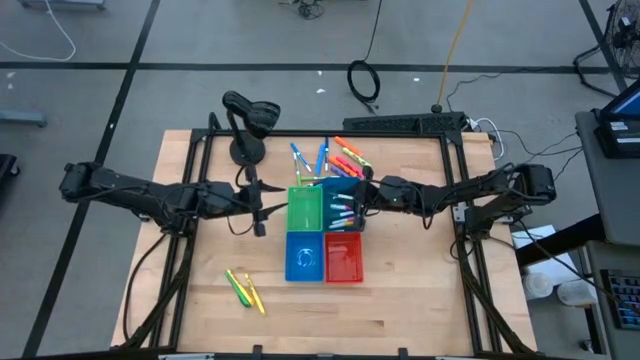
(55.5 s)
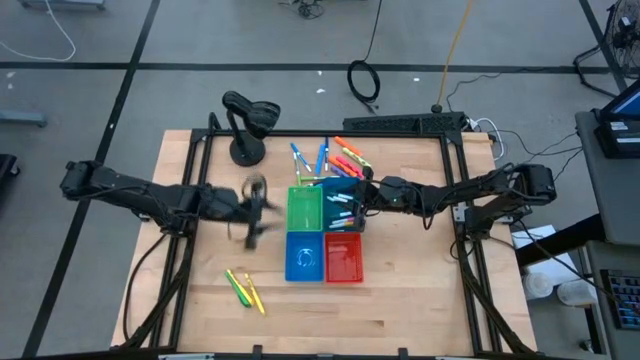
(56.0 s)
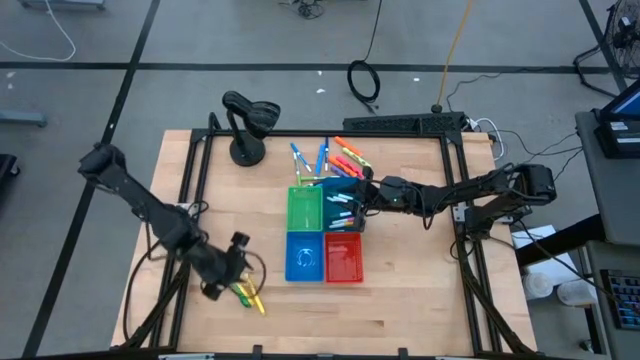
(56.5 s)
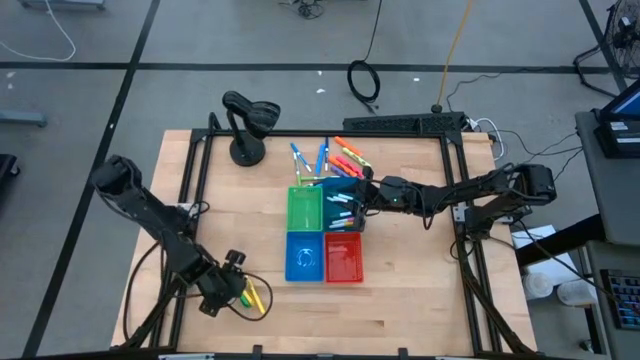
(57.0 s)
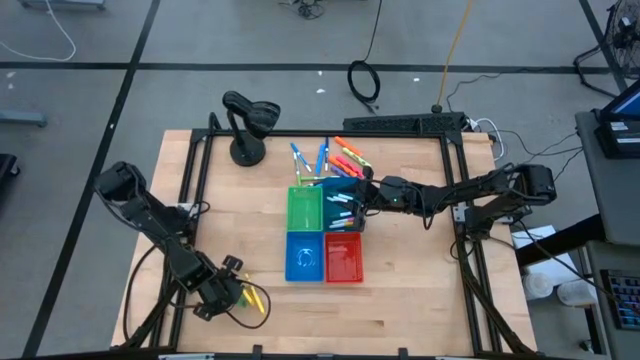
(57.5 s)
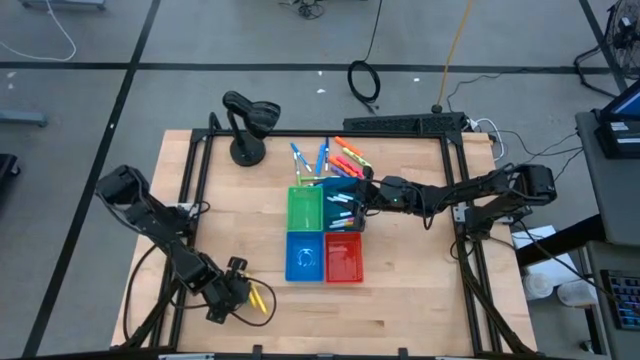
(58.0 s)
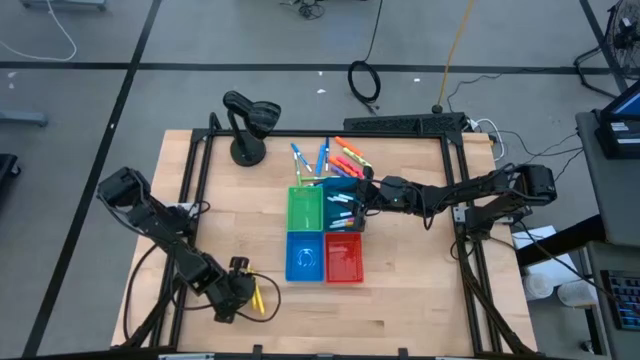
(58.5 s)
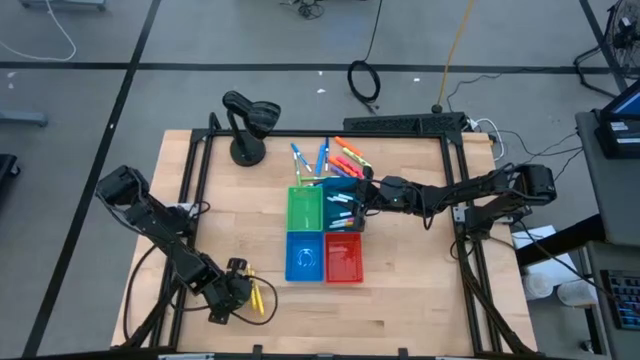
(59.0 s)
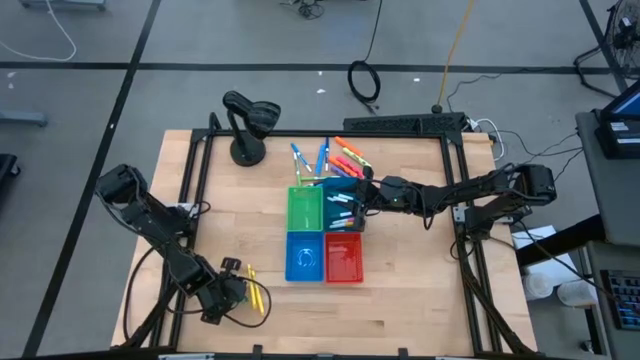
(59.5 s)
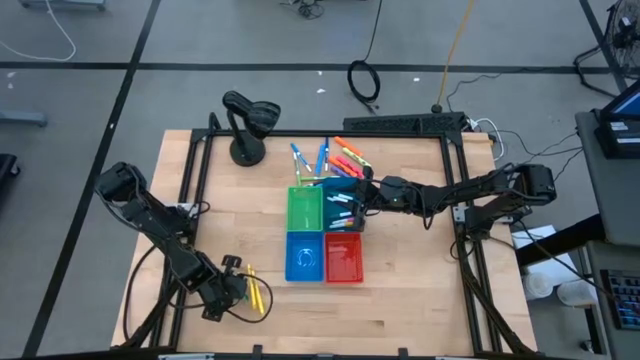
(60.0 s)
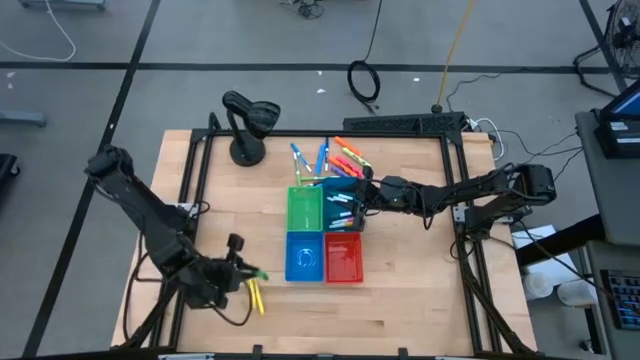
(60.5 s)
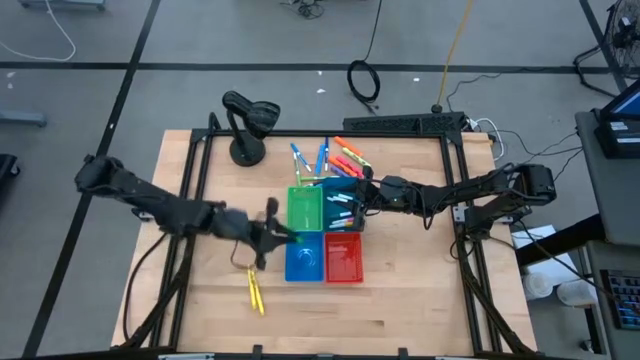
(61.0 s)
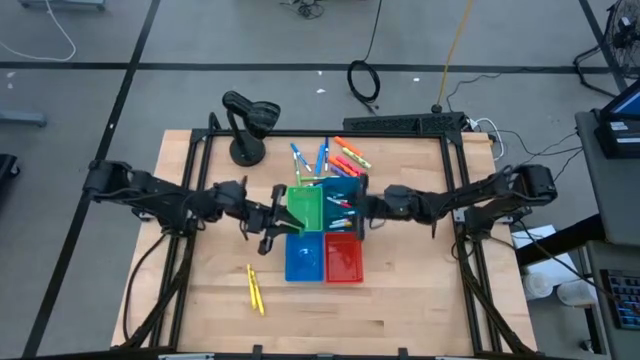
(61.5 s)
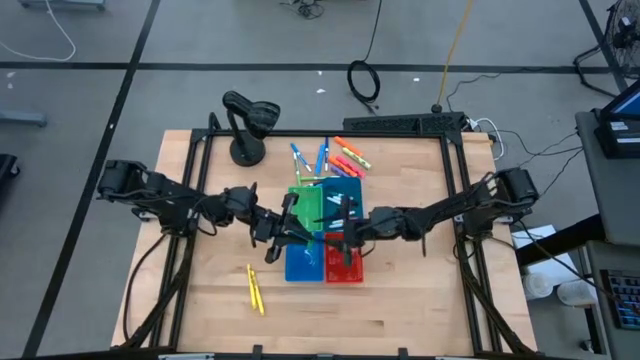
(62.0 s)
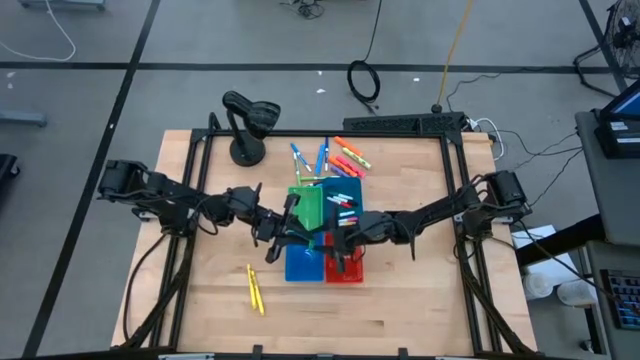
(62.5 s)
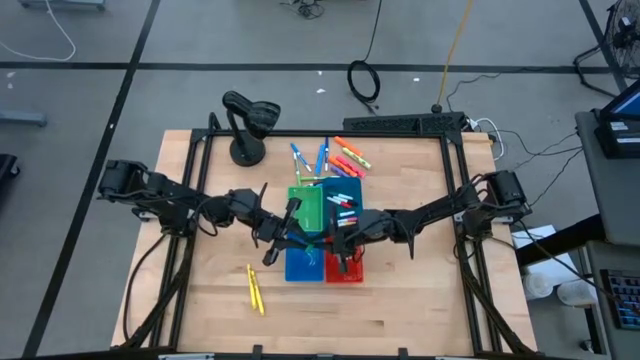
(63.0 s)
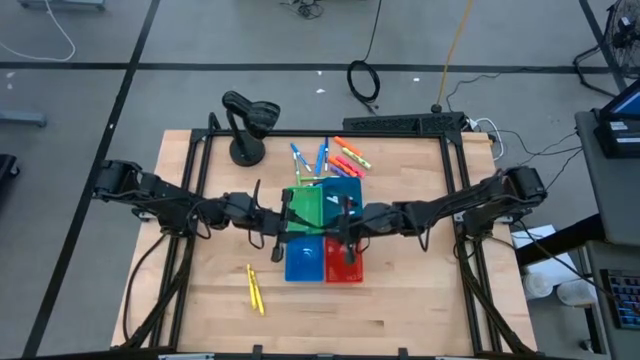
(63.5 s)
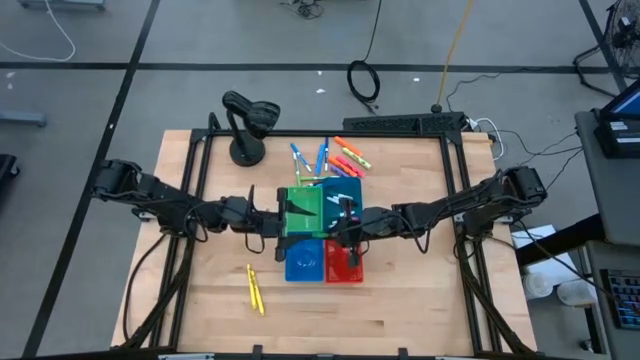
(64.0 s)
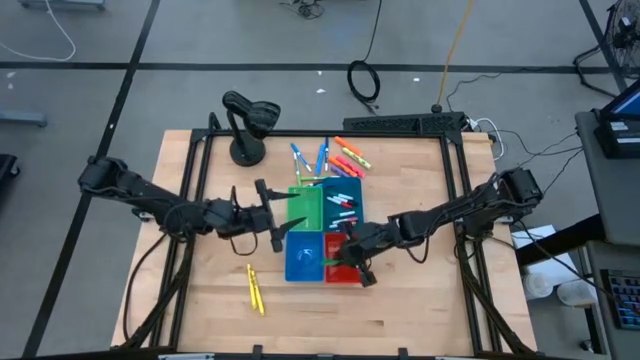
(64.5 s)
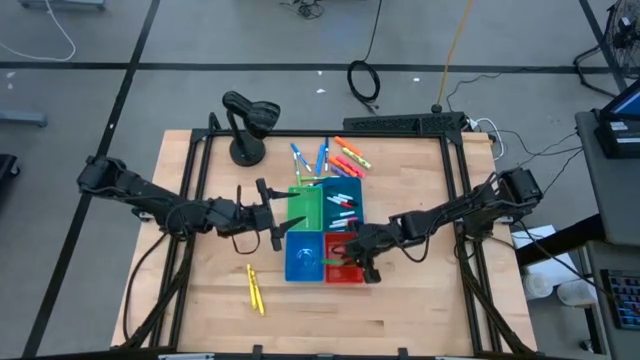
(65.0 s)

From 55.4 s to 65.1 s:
Task: Pick & Place Markers
Put the green pen into the red bin

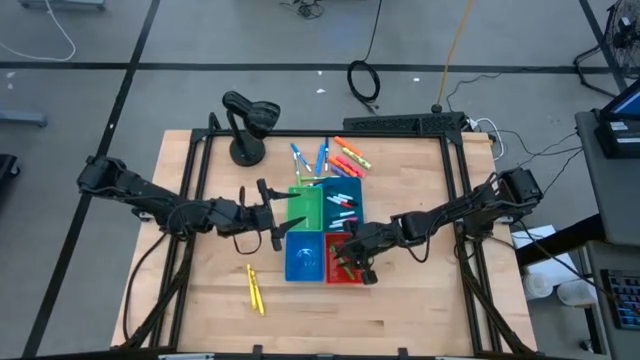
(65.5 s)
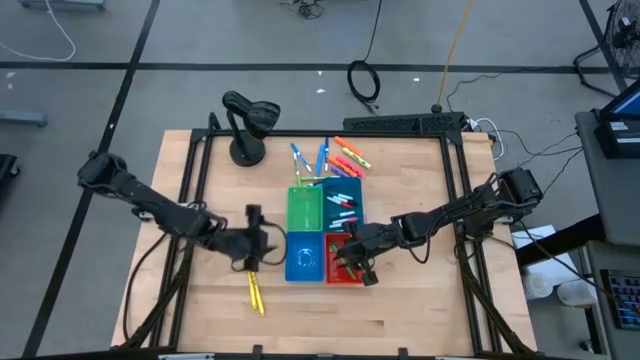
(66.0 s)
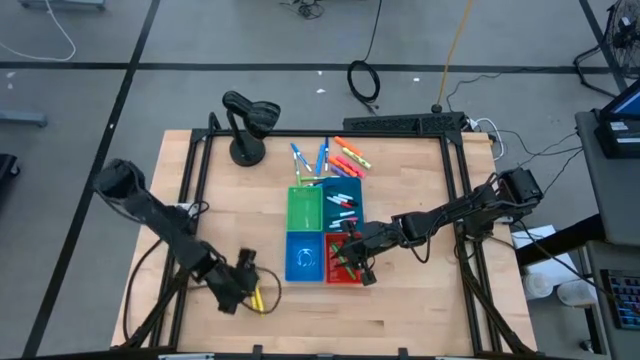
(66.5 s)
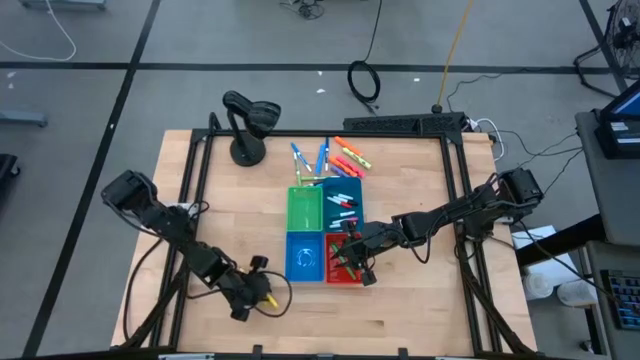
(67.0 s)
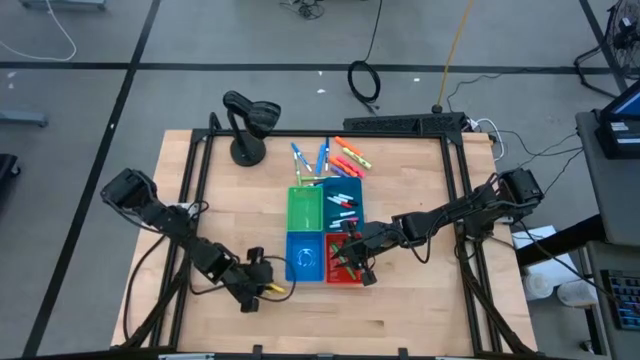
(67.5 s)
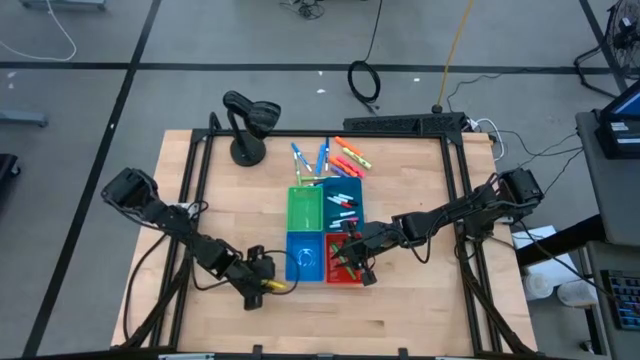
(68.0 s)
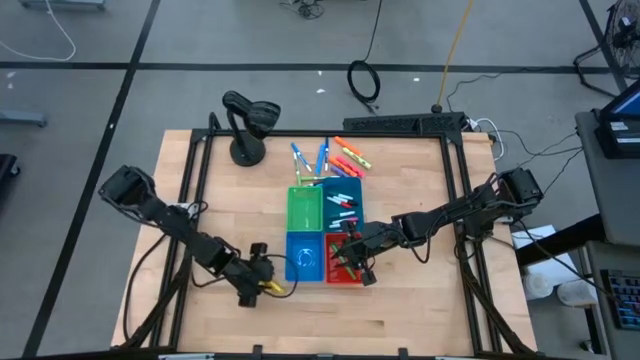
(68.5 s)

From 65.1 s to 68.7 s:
Put the yellow pen into the red bin

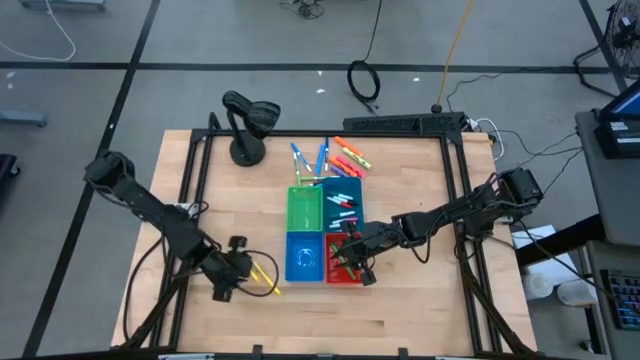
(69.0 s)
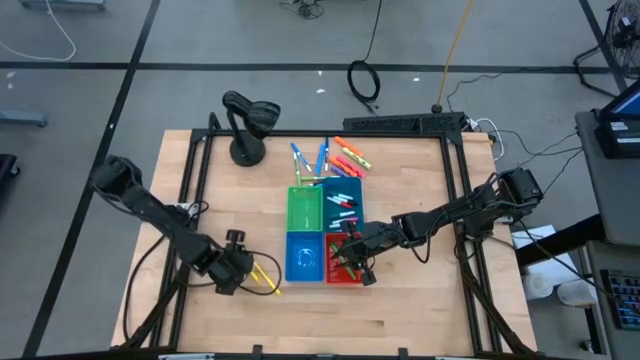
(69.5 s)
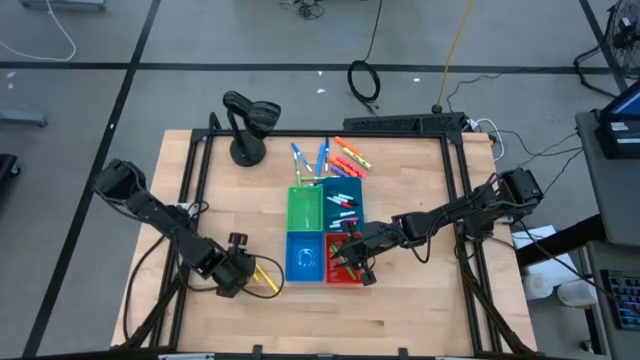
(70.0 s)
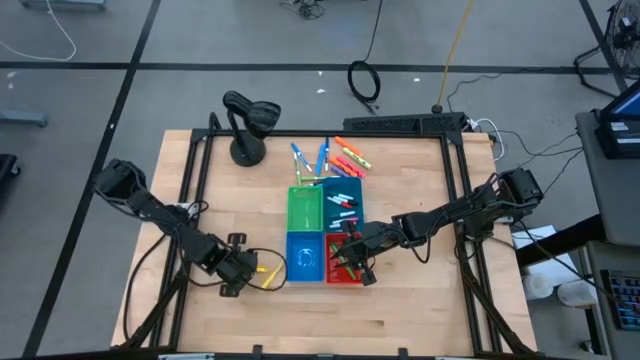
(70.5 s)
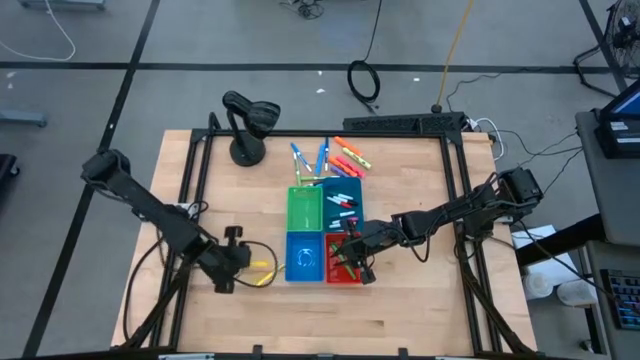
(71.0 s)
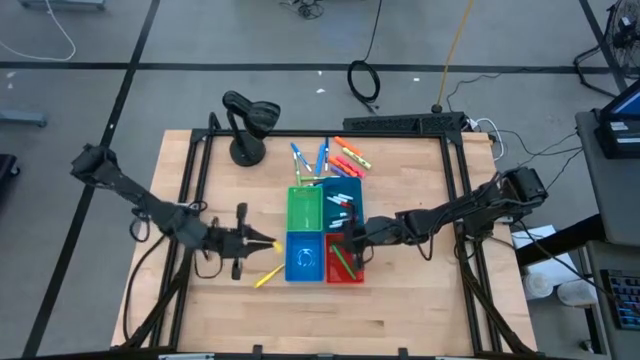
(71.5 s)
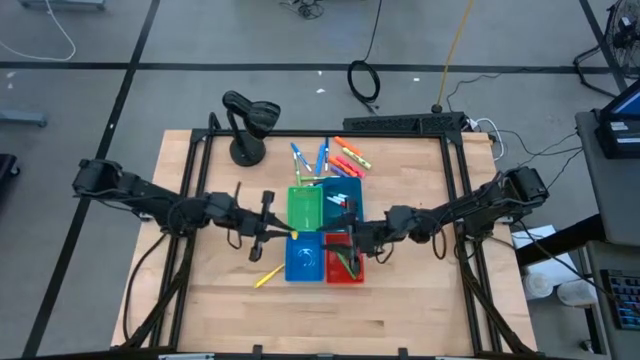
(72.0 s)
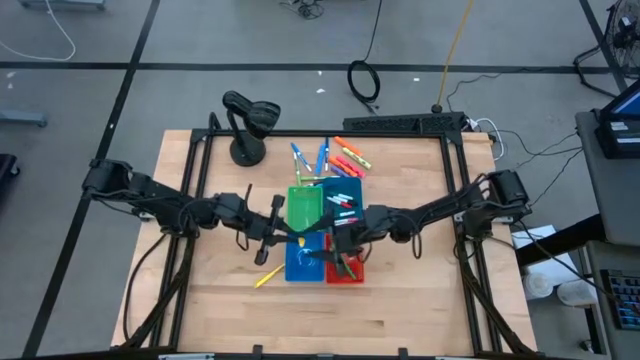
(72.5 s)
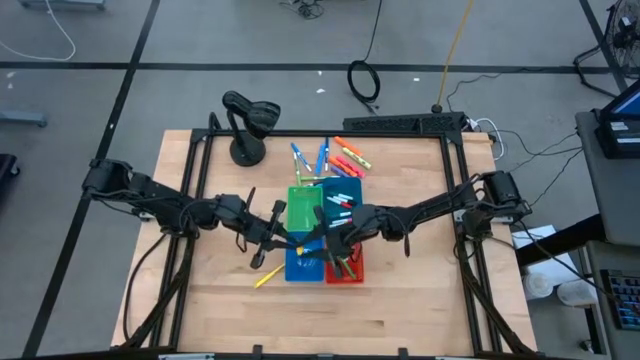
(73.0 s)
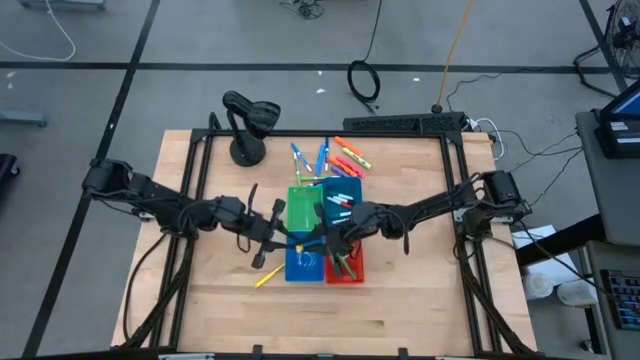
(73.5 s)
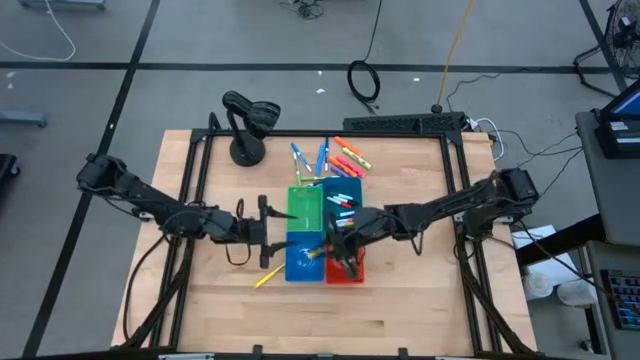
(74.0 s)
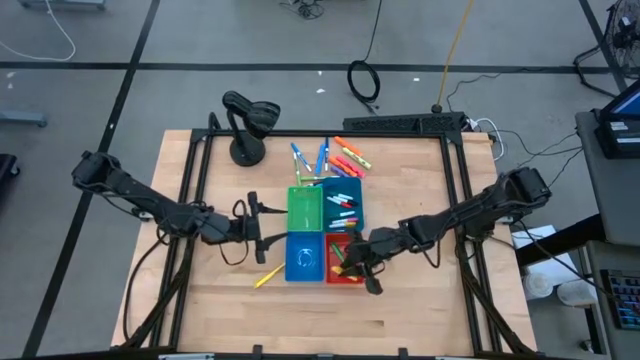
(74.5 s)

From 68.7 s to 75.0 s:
Put the yellow pen into the red bin

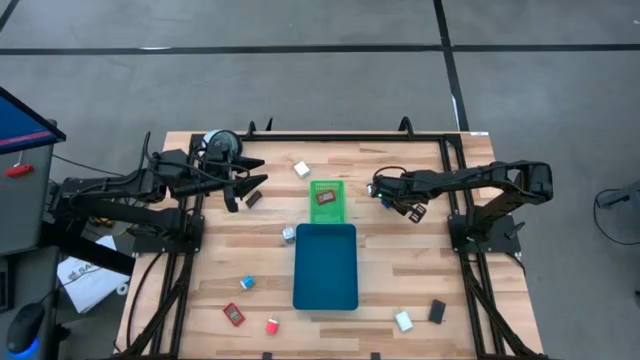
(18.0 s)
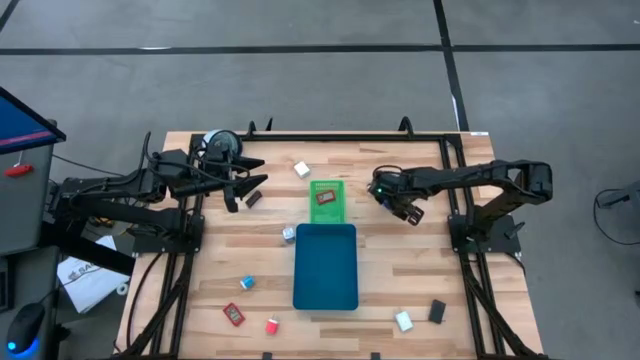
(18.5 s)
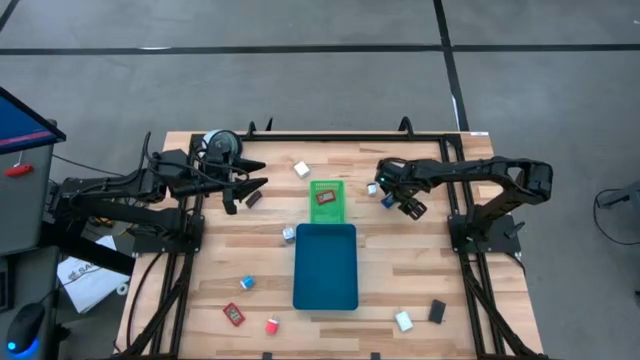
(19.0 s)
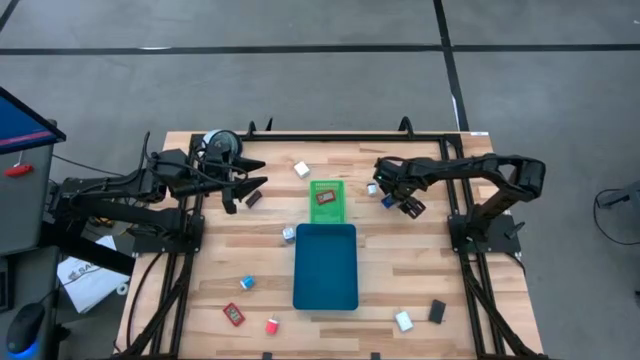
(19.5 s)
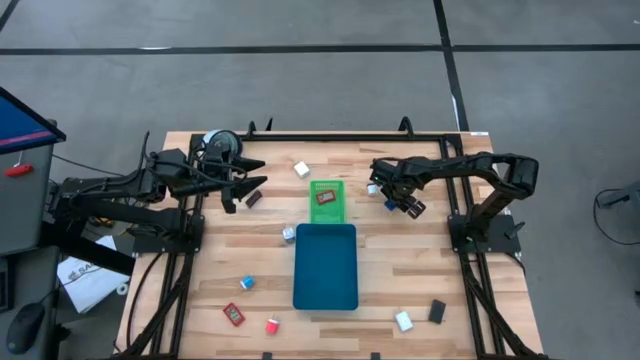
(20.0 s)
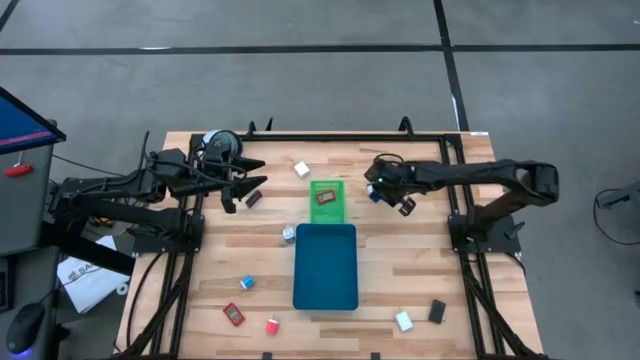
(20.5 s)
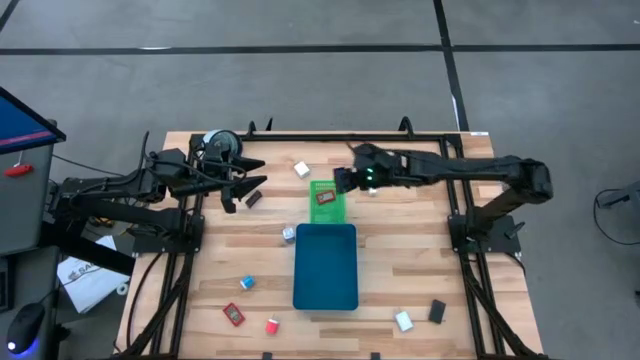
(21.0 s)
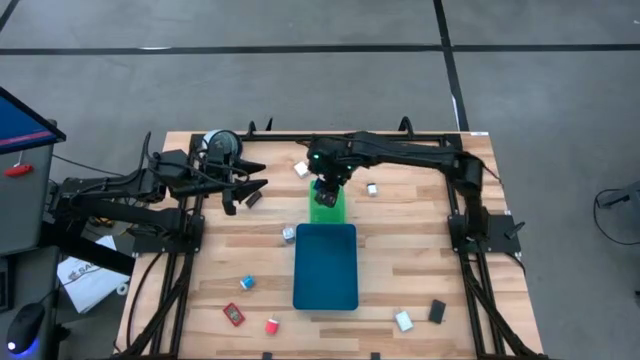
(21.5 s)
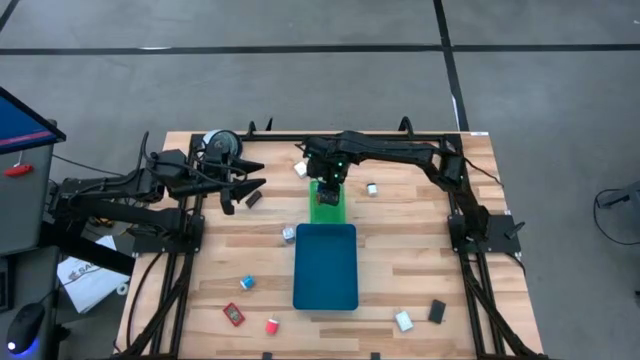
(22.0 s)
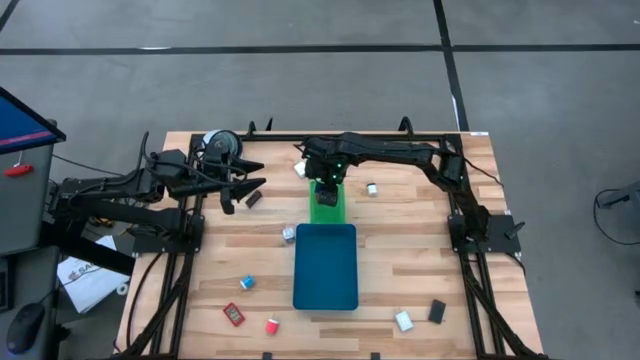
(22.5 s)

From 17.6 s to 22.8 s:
Task: Pick & Place Office items
Put the blue digital clock into the green bin
